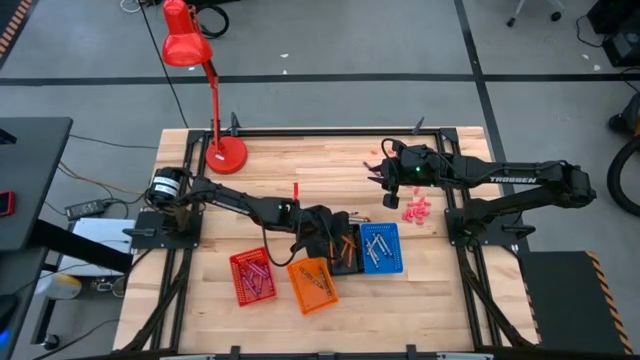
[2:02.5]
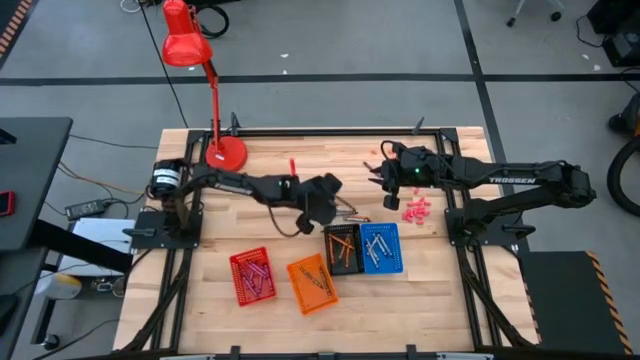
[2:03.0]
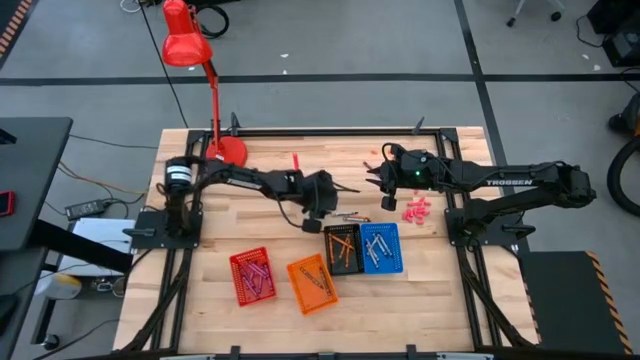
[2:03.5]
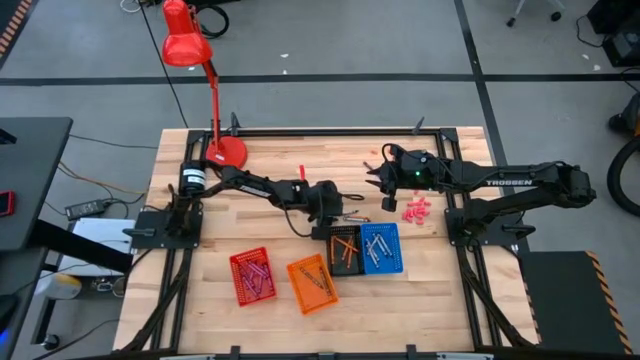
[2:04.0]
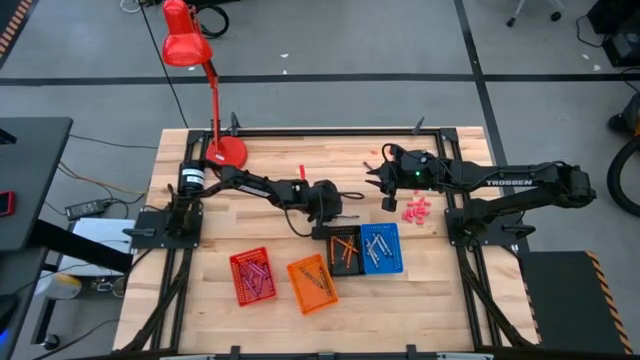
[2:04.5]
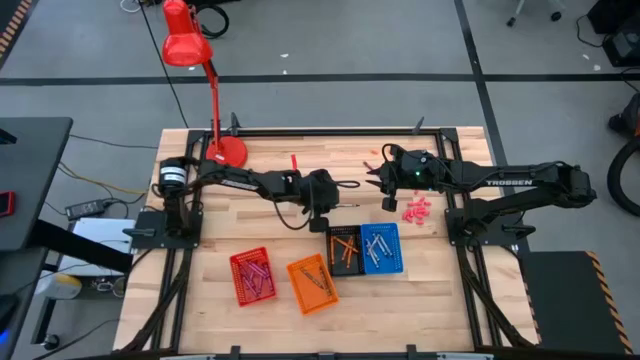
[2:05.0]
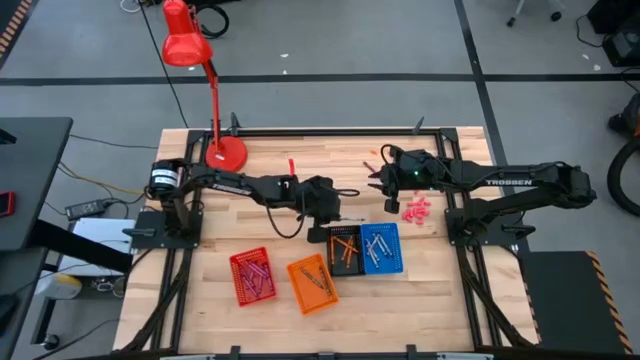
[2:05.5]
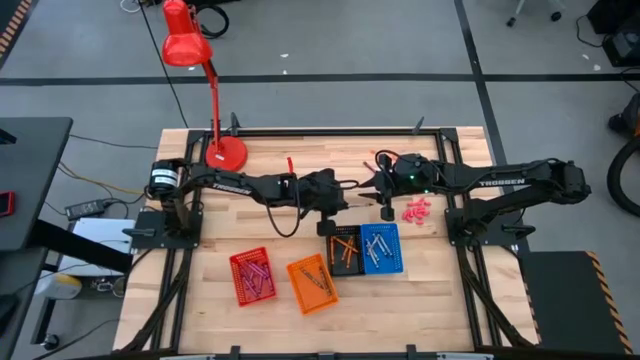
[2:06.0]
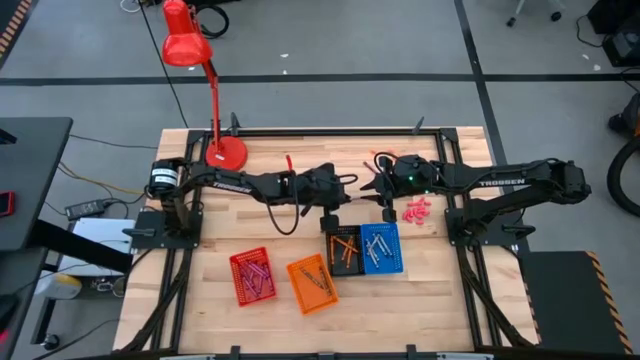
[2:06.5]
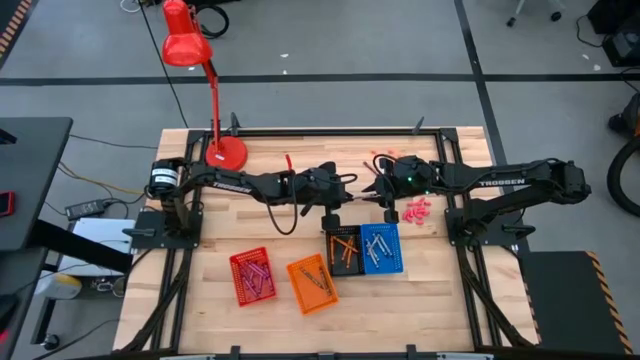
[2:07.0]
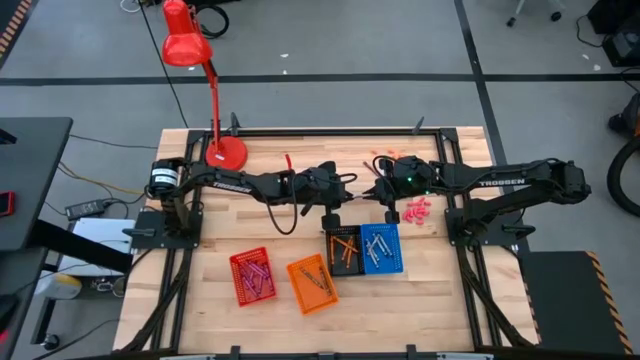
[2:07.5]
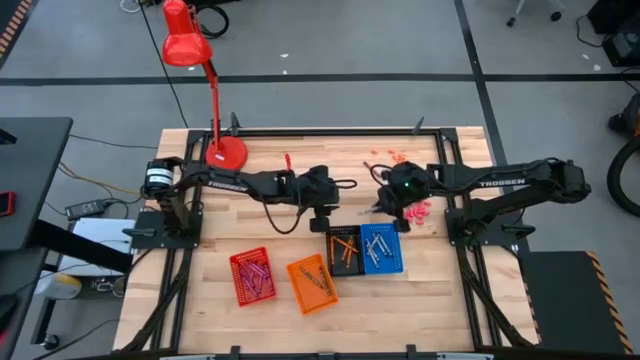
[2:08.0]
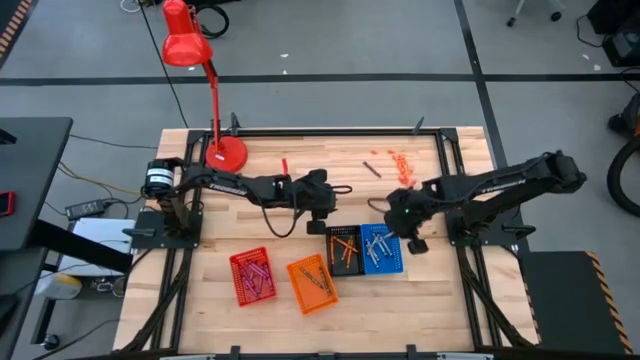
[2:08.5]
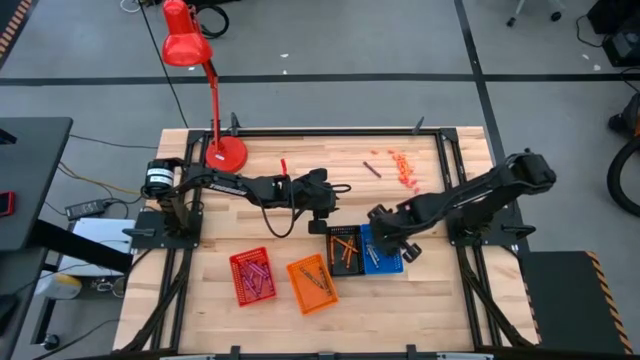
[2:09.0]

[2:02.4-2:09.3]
Task: Sort crayons
Put the black crayon into the blue bin

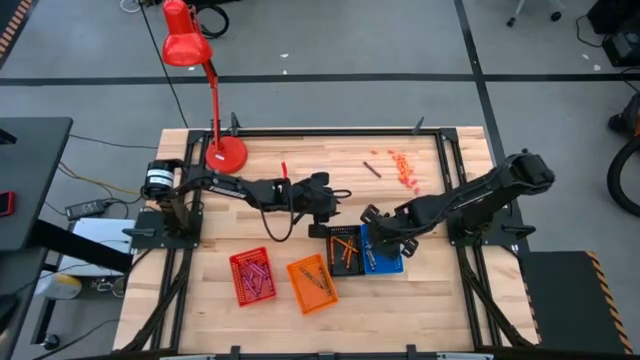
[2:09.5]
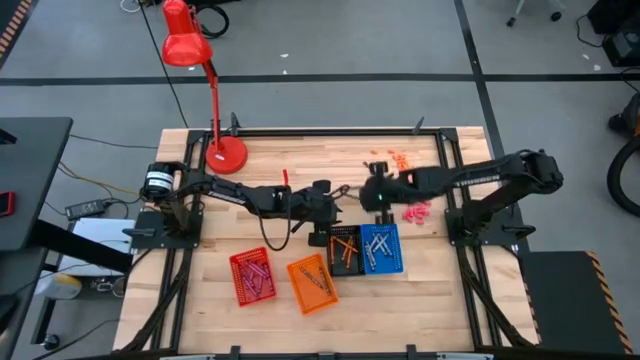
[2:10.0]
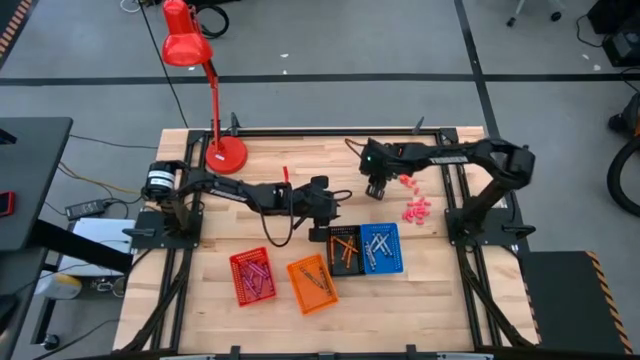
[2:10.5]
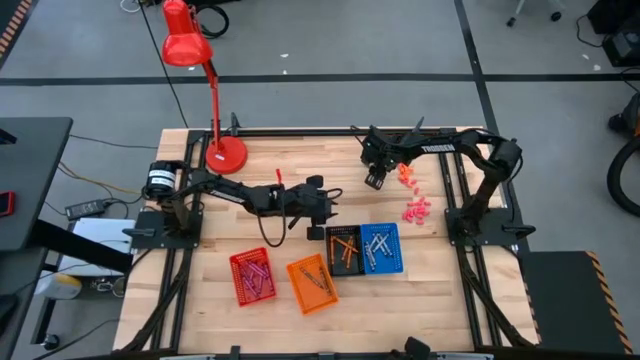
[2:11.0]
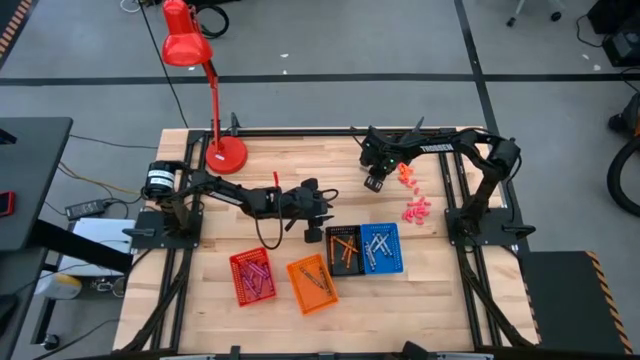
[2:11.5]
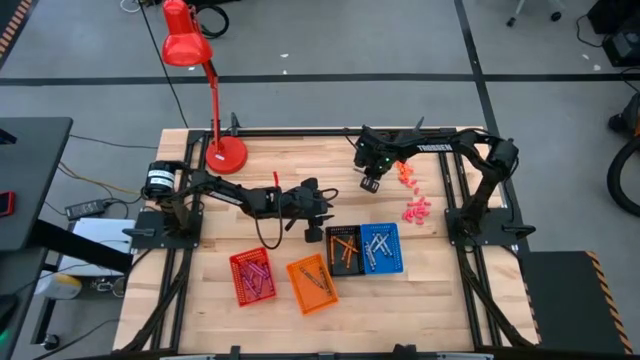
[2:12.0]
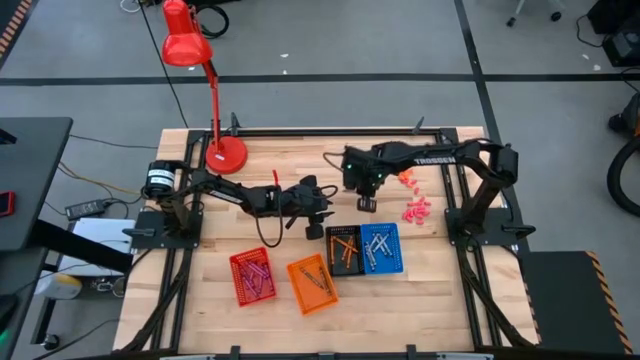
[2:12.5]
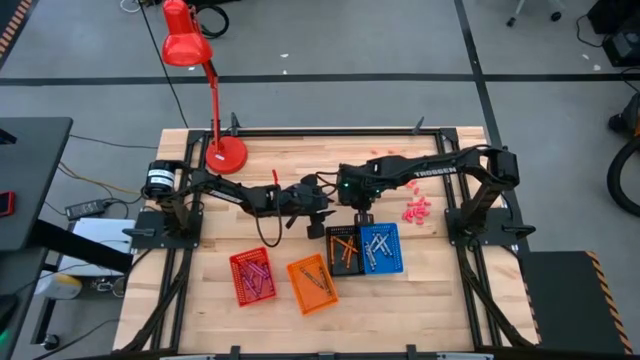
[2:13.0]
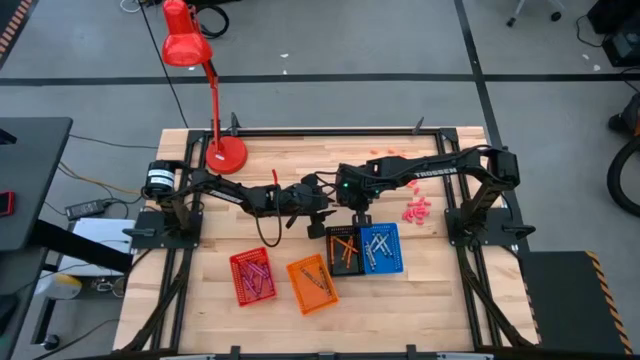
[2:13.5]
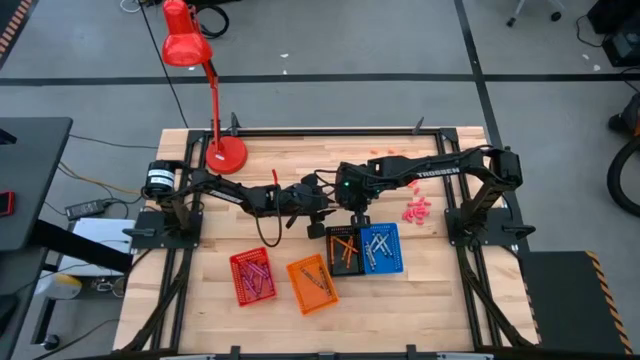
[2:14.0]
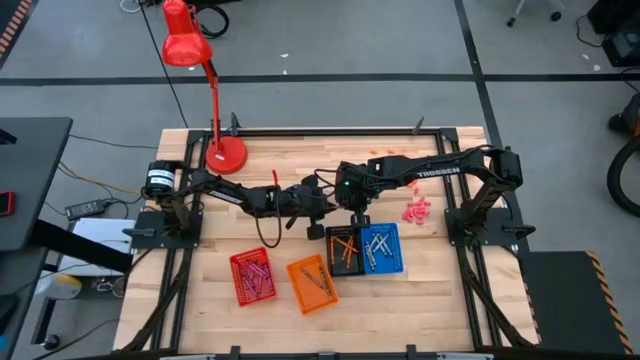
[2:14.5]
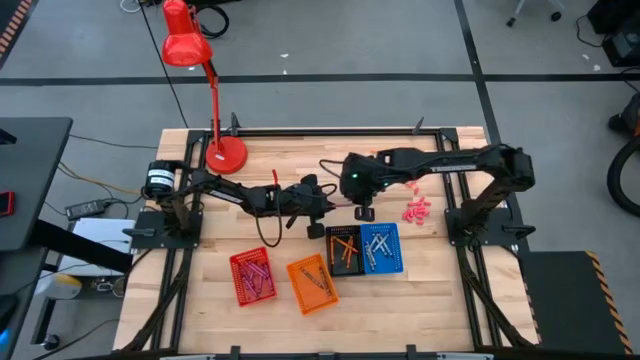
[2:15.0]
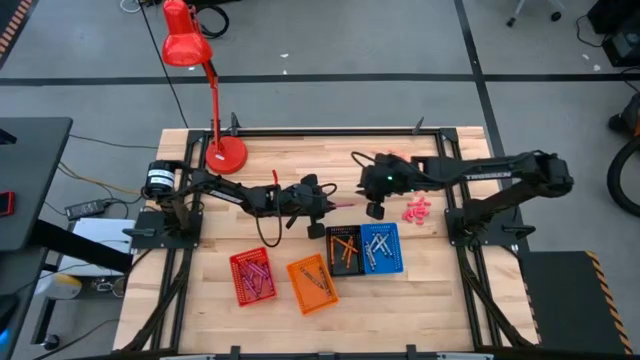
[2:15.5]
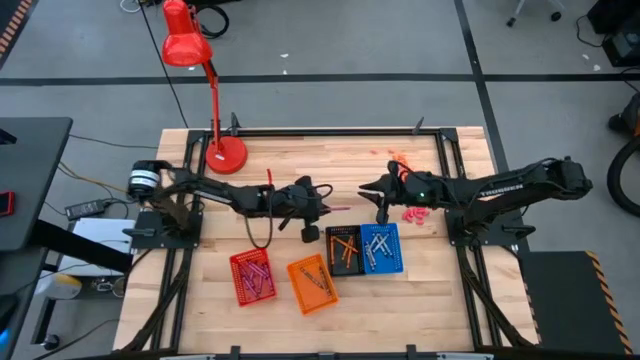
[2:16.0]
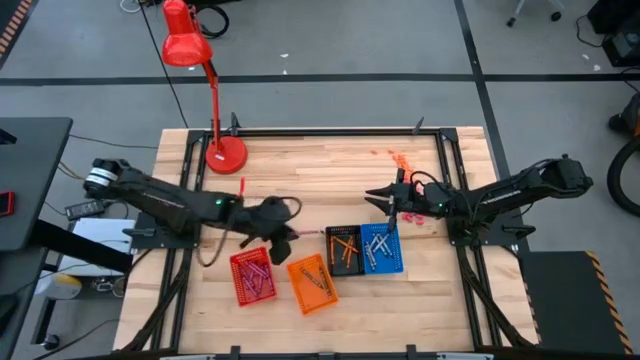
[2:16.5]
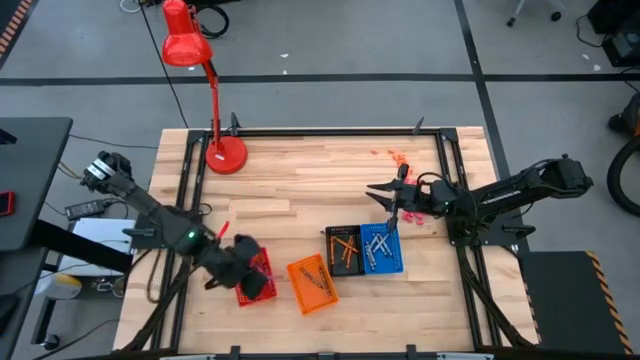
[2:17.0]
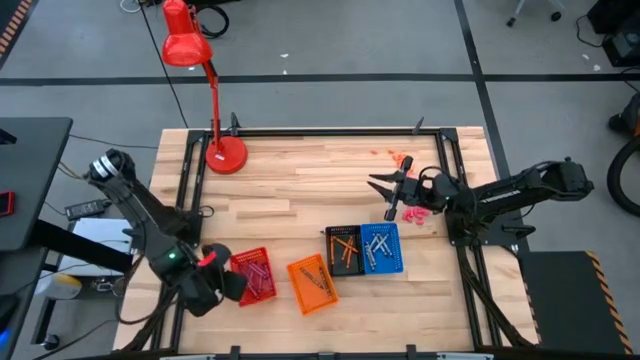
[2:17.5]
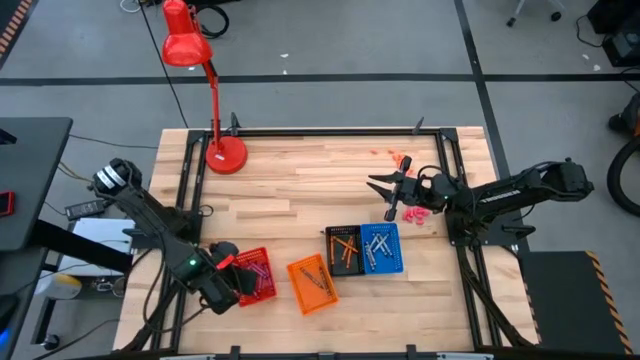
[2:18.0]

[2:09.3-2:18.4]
Put the pink crayon into the red basket

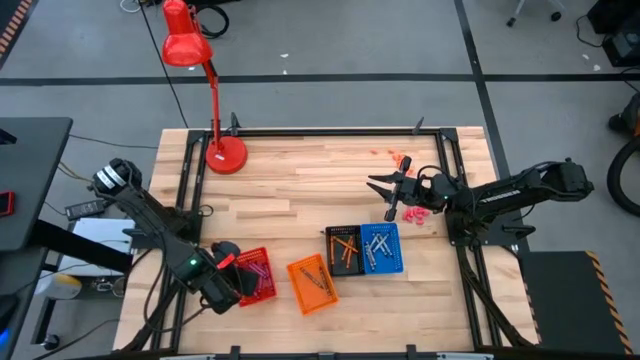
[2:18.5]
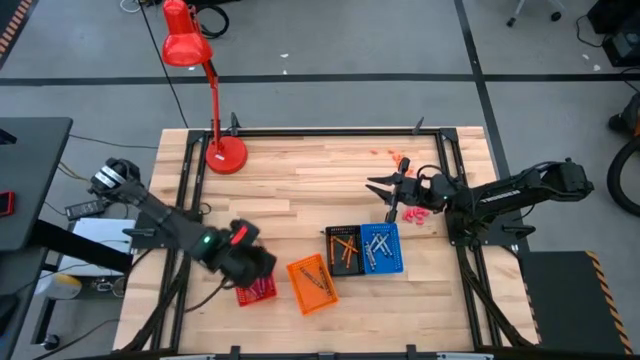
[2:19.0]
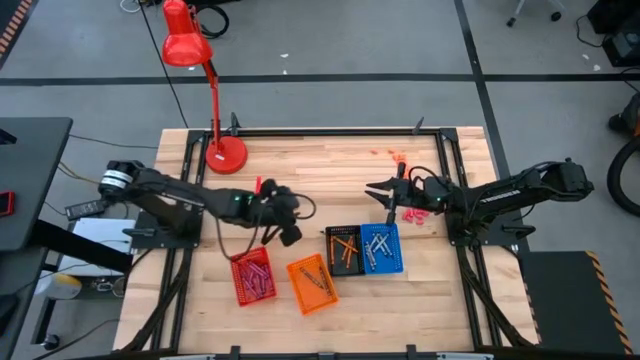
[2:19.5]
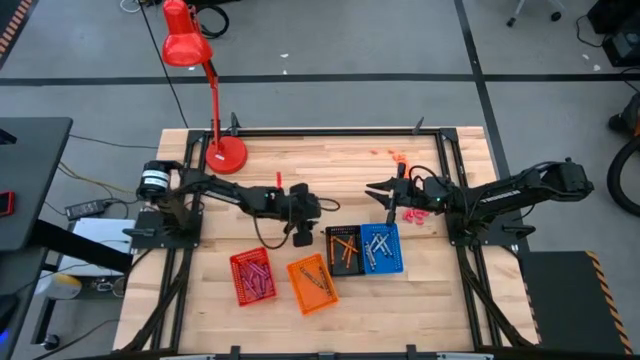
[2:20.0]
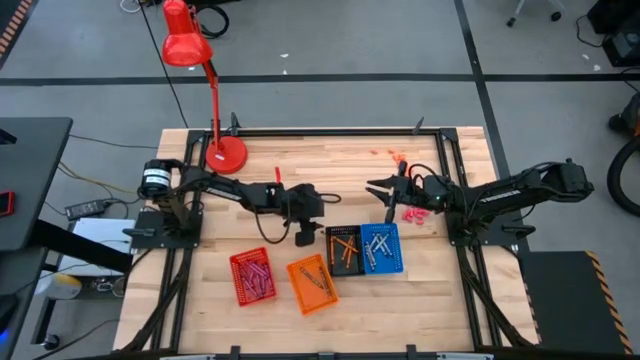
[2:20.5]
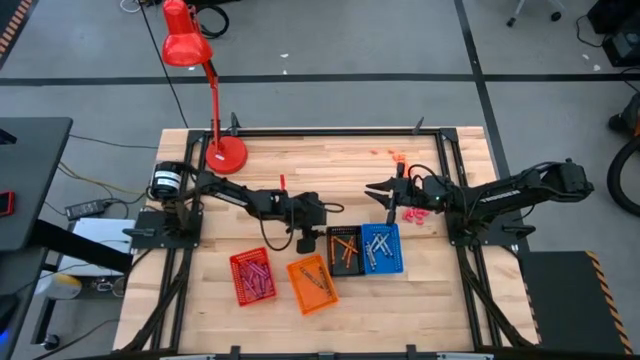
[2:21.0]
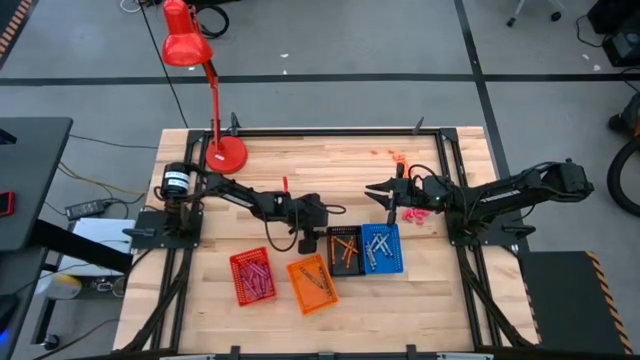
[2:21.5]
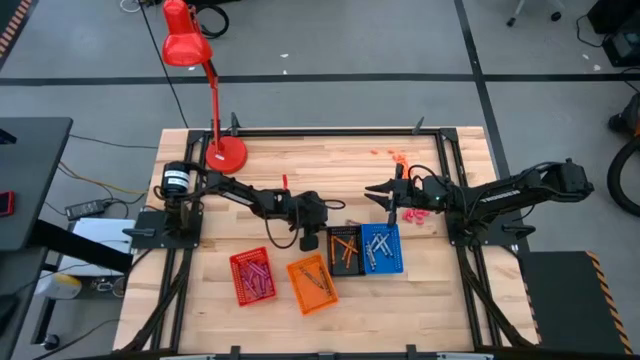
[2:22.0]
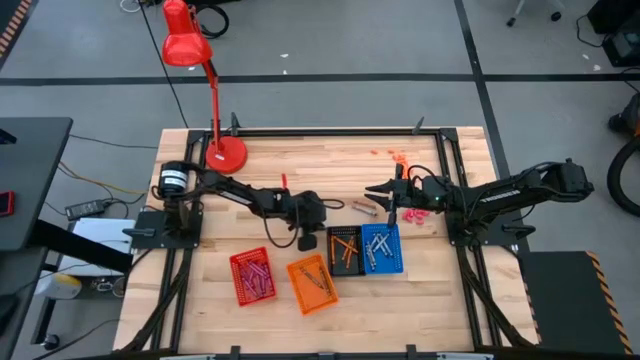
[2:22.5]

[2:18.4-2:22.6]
Put the black crayon into the blue bin
